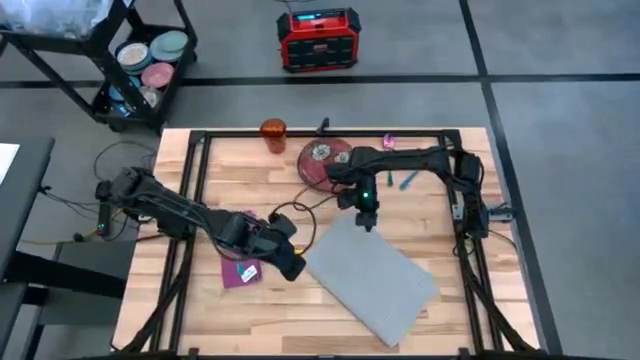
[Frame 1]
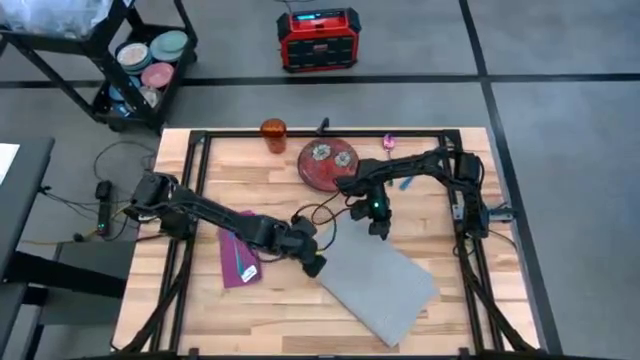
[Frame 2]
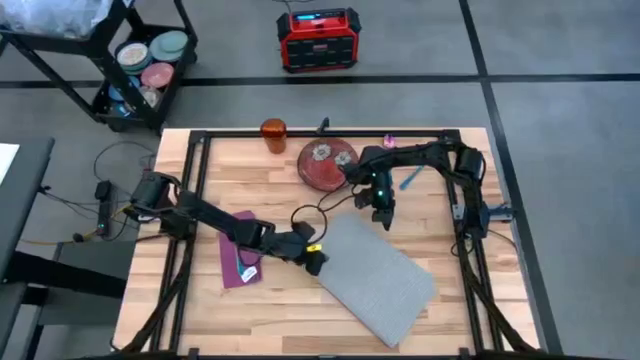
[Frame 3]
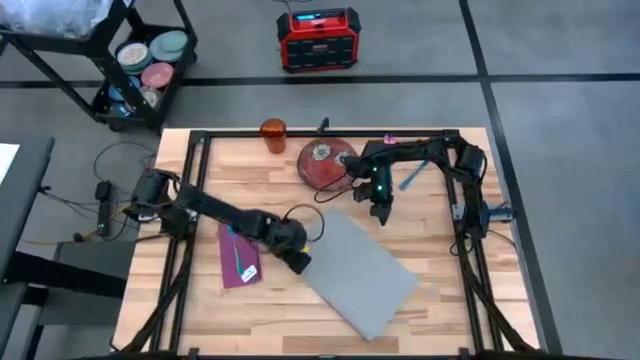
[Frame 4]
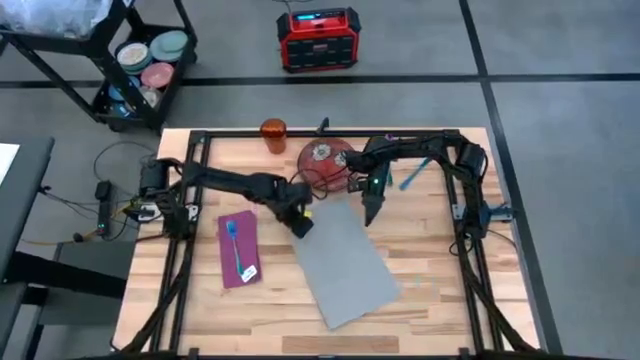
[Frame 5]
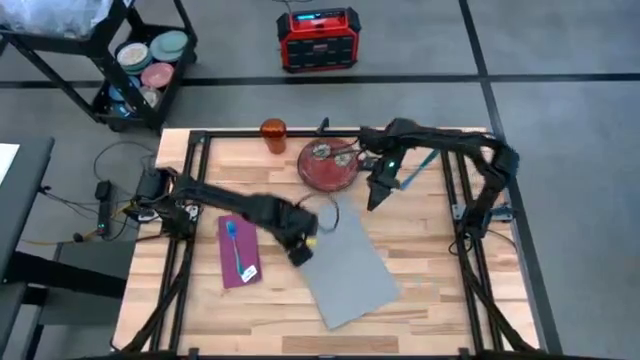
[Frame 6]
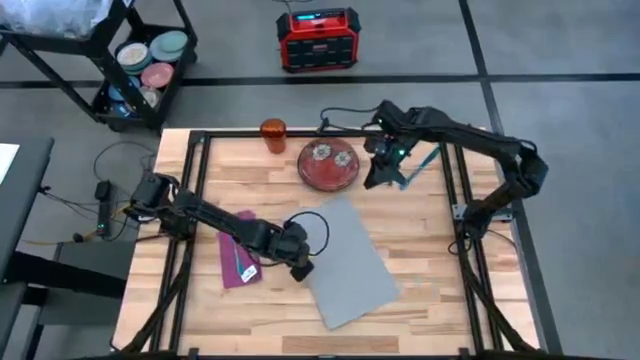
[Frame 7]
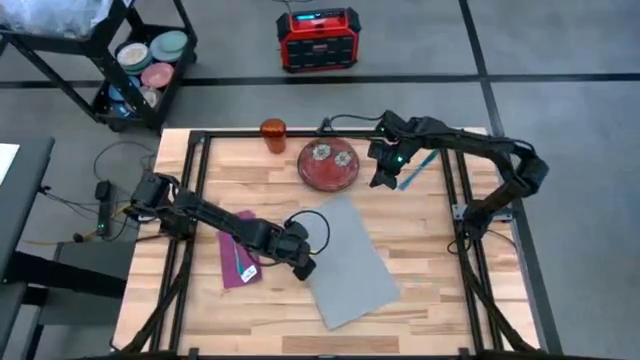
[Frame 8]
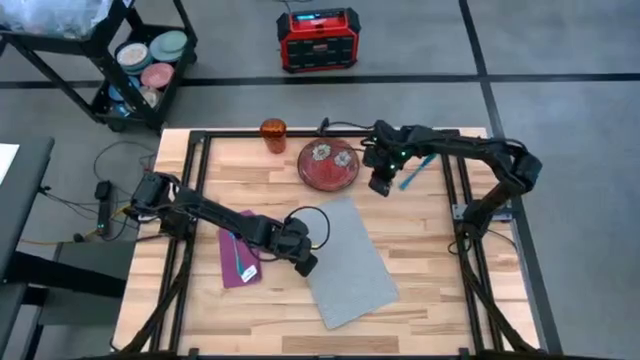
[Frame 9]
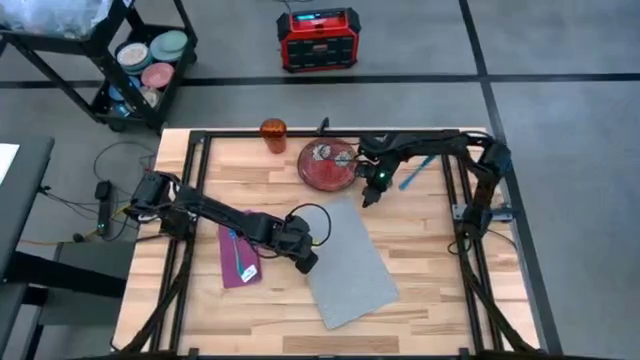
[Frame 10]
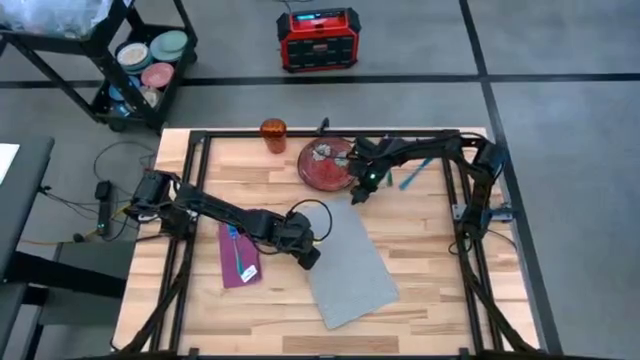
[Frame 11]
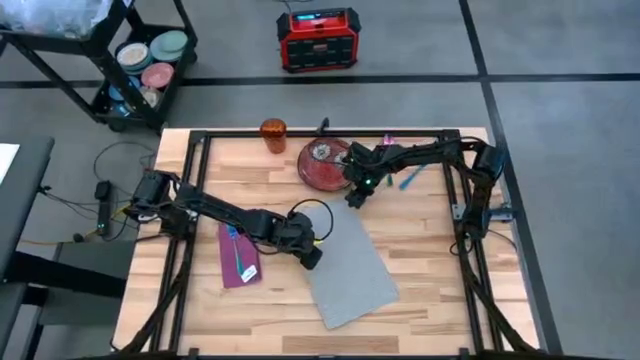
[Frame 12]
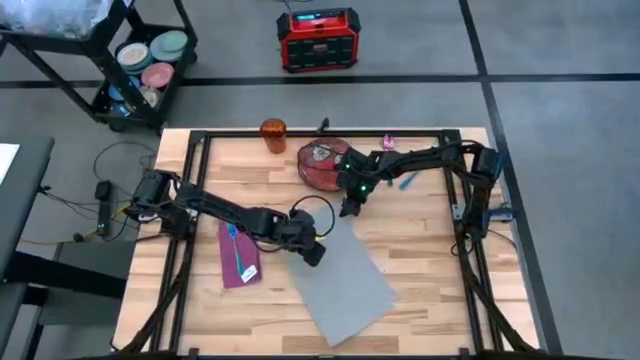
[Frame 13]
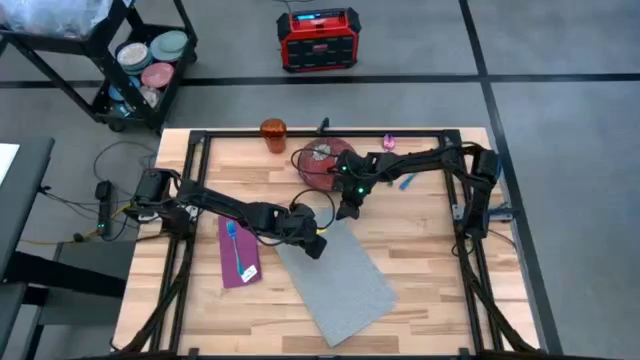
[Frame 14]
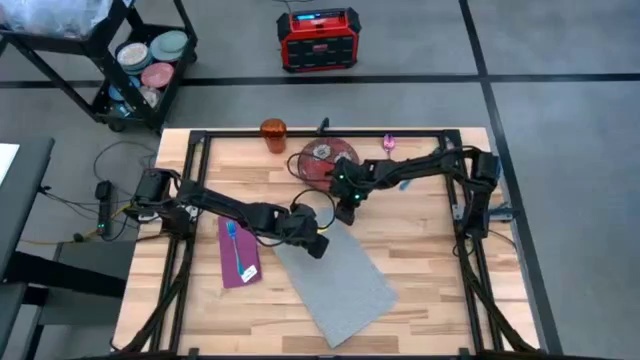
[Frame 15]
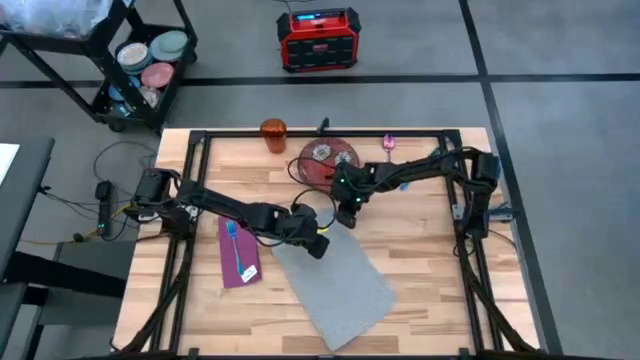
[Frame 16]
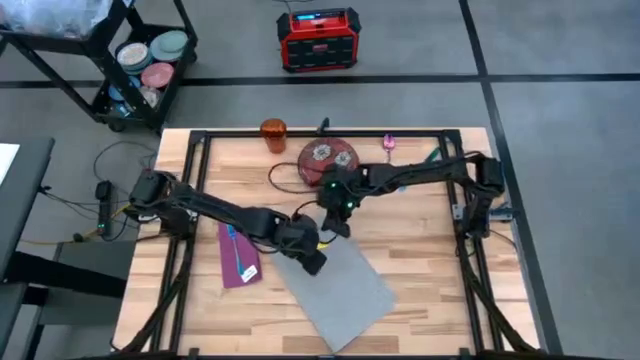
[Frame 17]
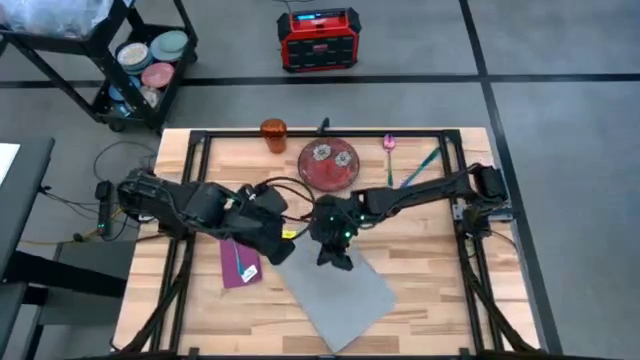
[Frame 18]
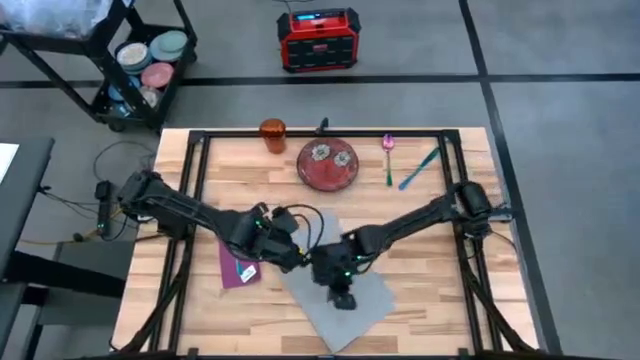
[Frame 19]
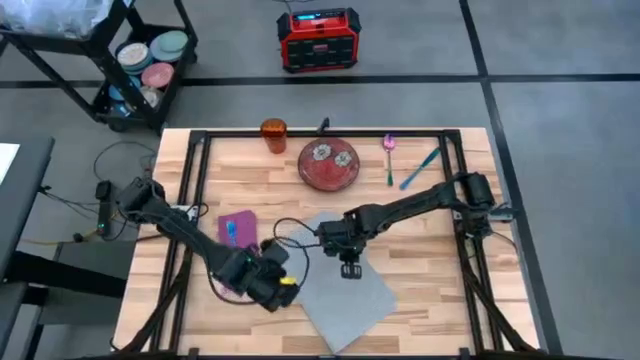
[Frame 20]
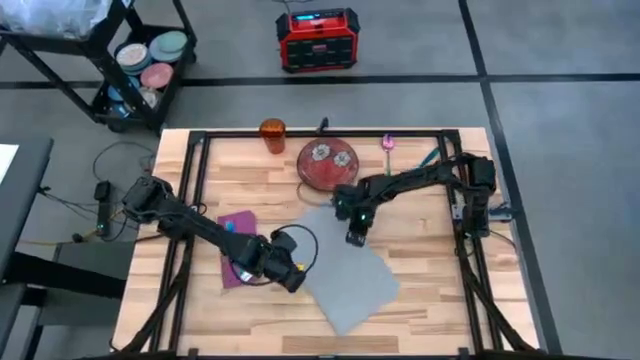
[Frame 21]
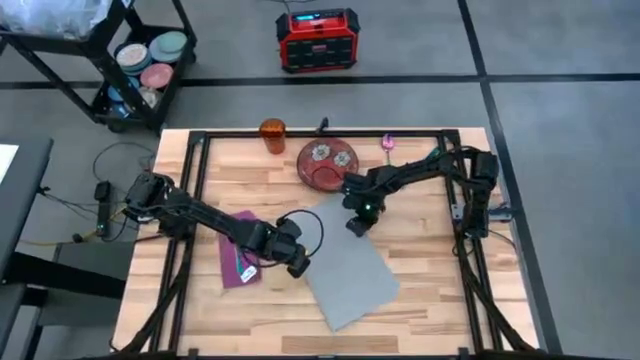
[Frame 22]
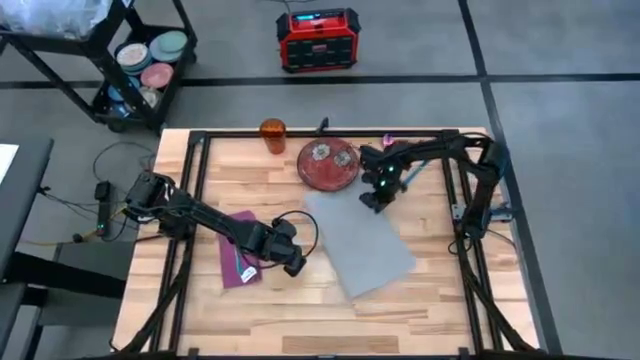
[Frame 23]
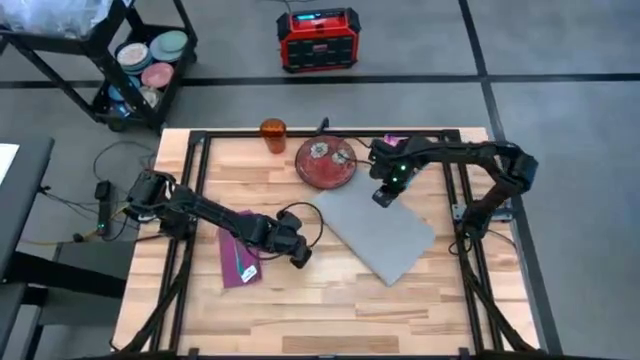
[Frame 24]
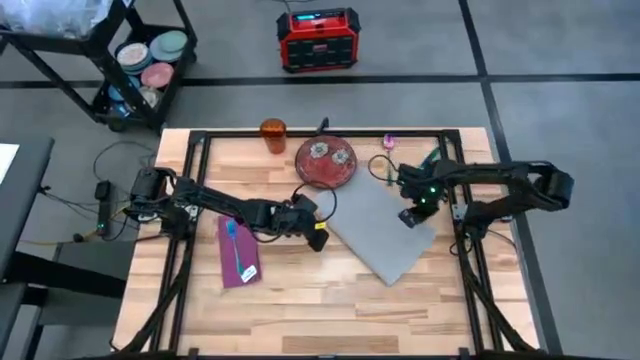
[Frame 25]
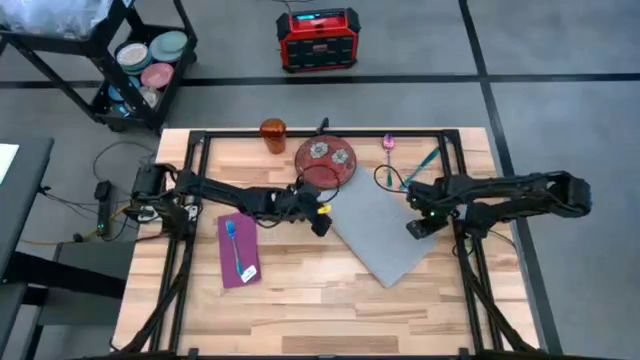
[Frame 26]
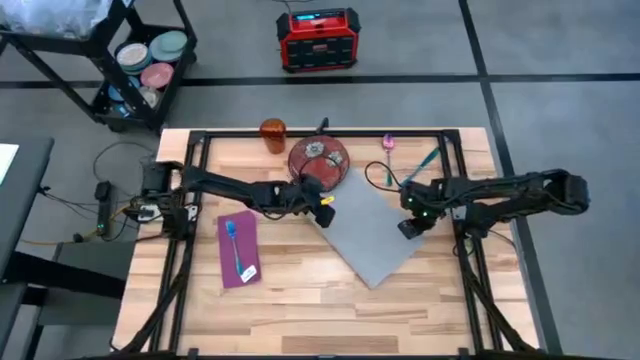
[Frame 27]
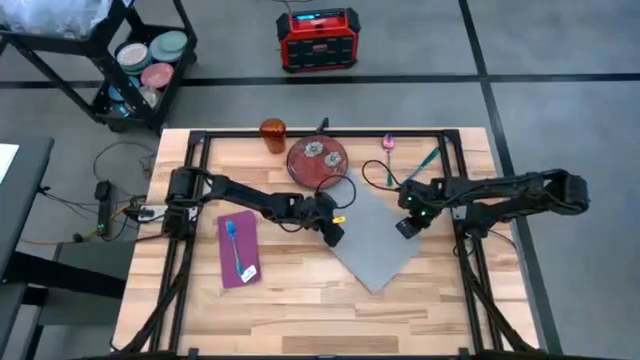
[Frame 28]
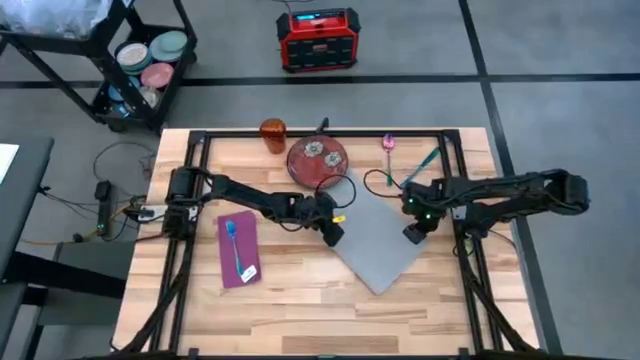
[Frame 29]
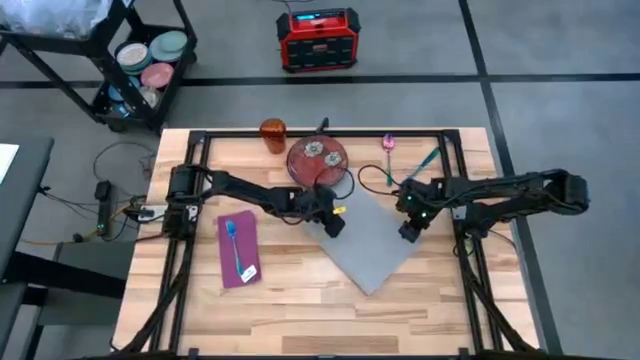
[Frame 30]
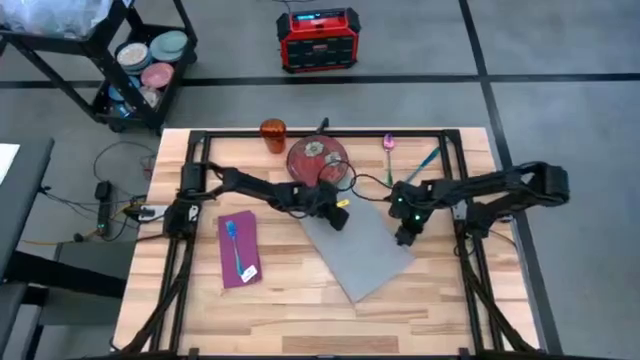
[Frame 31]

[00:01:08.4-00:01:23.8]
Task: Set table place
Prepare the gray placemat

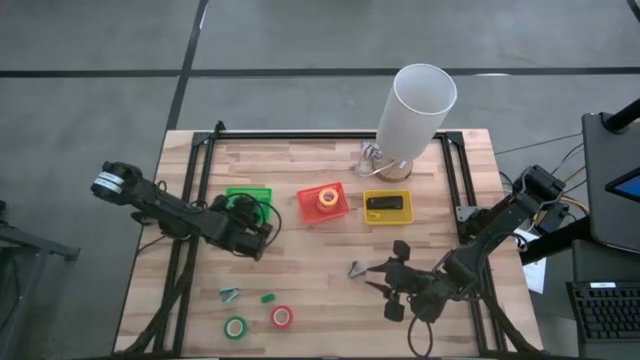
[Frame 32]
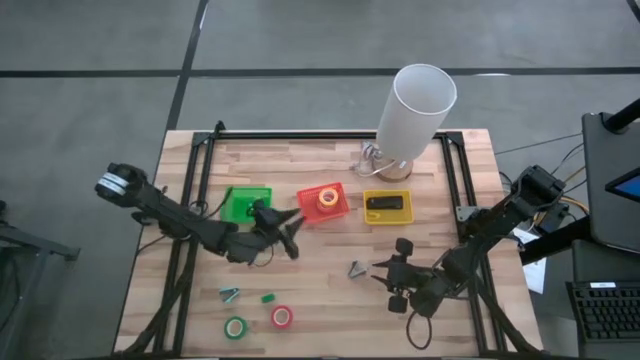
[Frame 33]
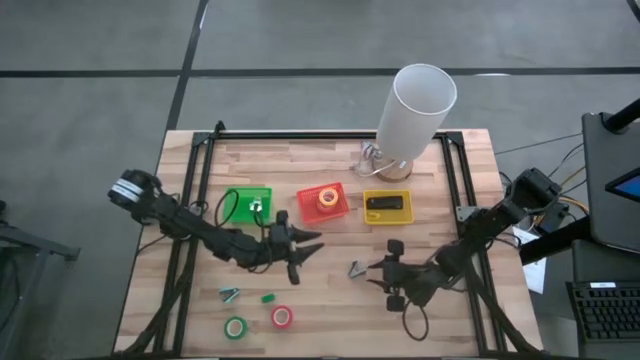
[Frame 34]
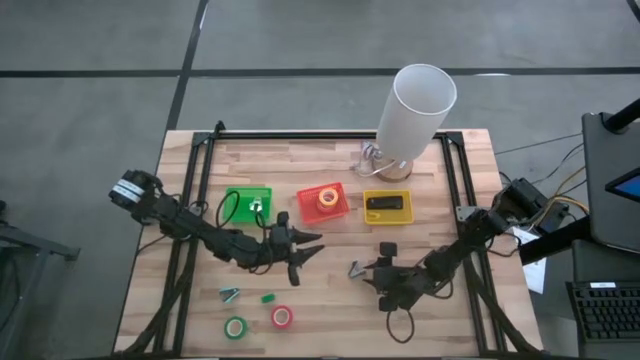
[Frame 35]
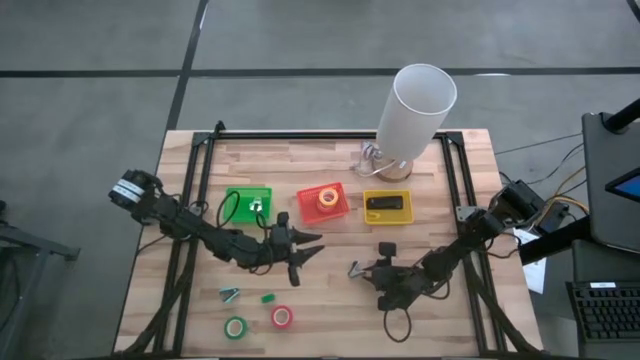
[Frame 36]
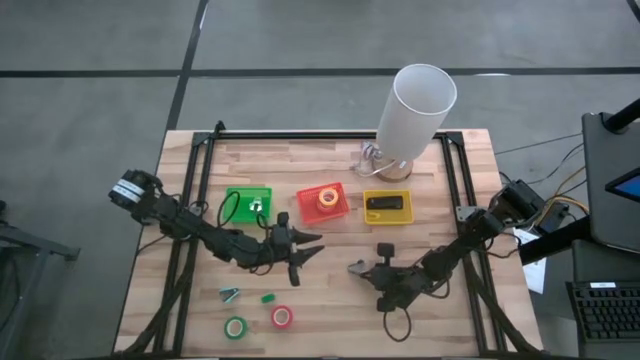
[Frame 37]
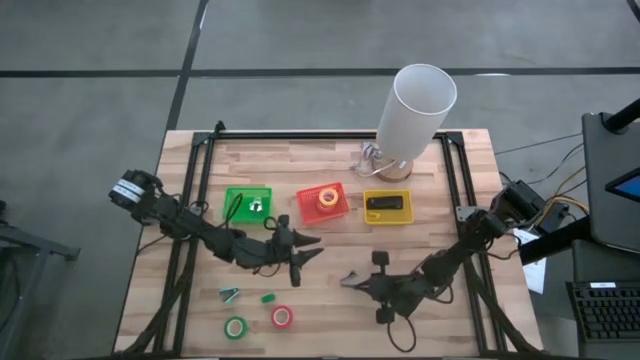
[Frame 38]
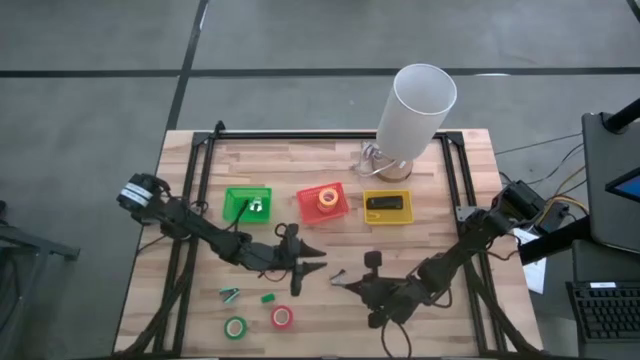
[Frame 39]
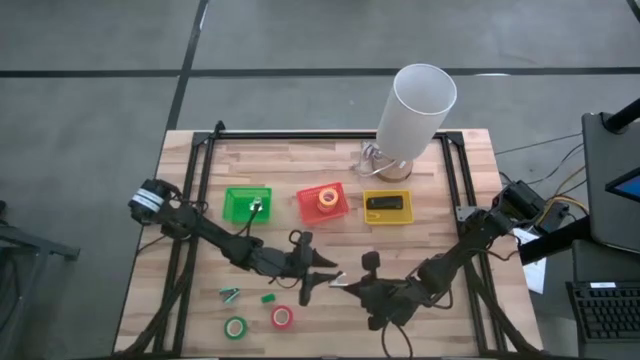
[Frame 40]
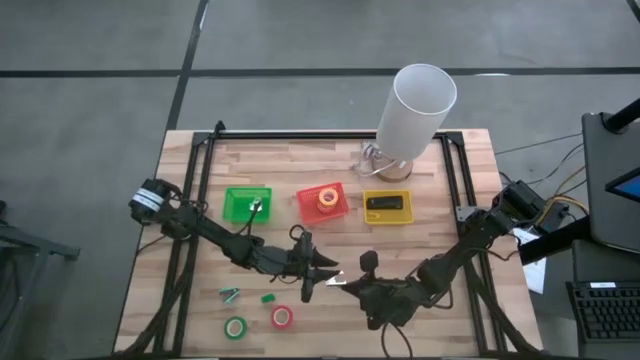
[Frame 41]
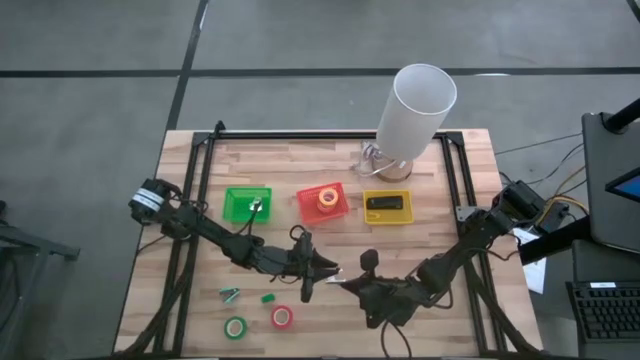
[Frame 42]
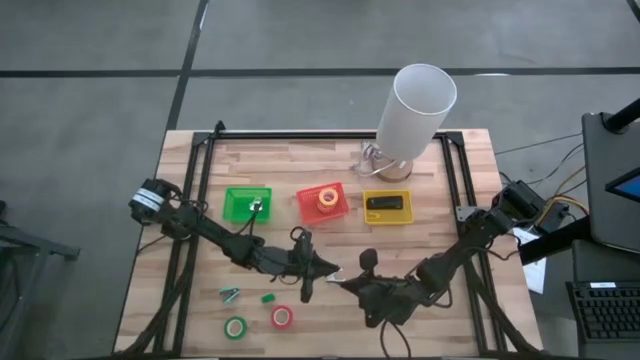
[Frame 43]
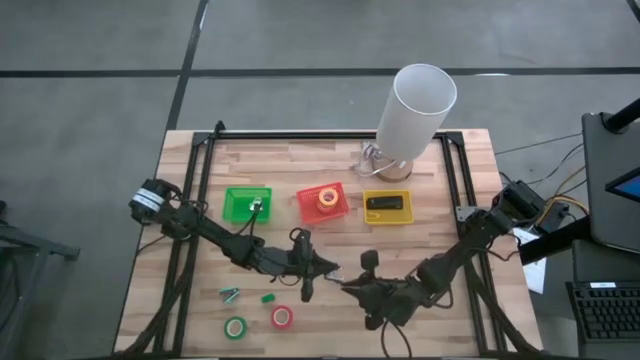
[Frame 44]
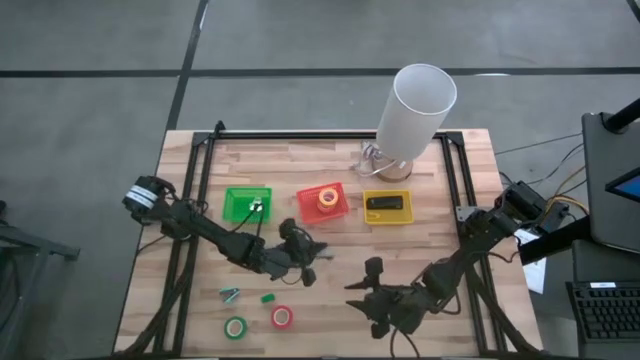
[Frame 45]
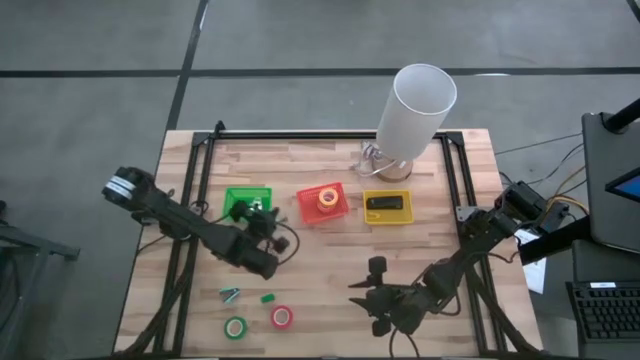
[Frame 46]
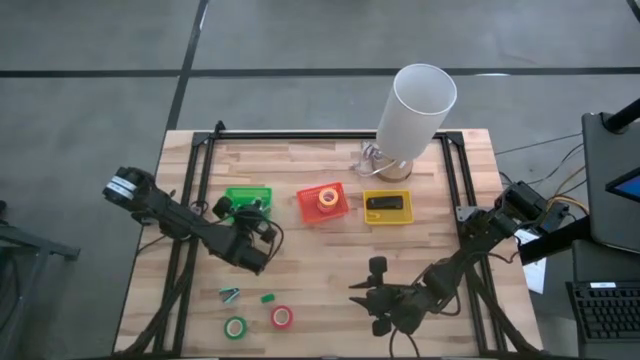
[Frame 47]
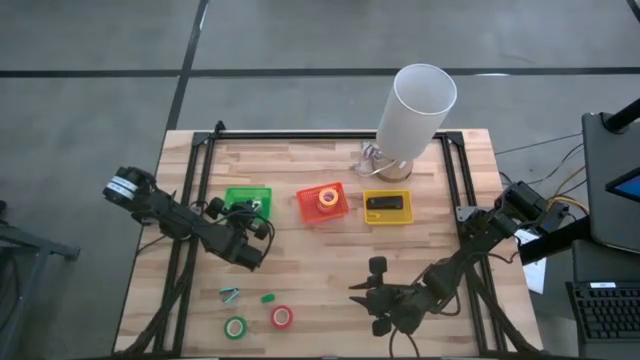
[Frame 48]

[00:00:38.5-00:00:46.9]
Task: Pick and place Stapler, Stapler remover, tape
Put the black staple remover into the green basket
